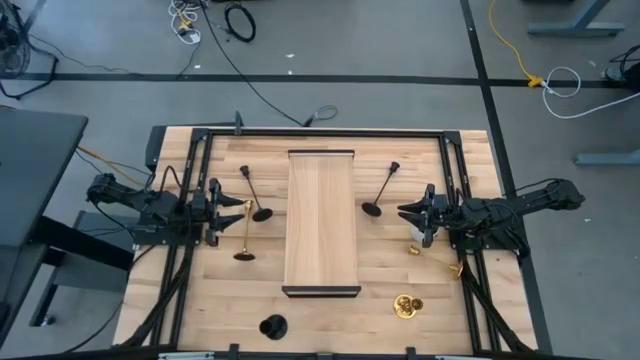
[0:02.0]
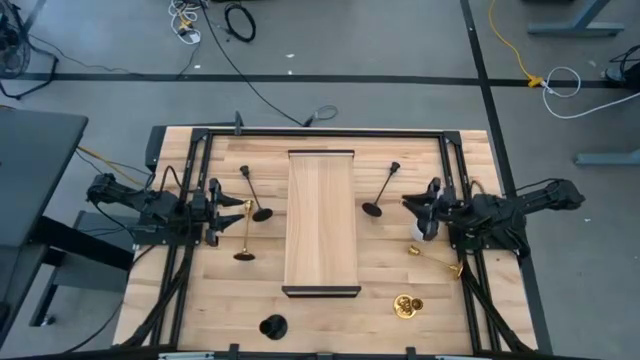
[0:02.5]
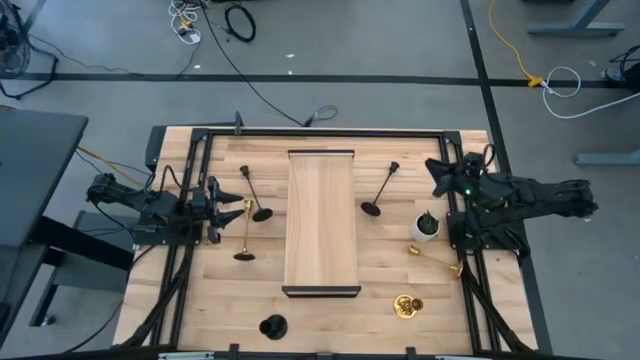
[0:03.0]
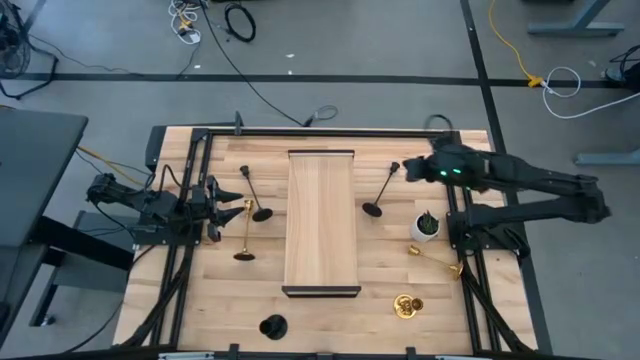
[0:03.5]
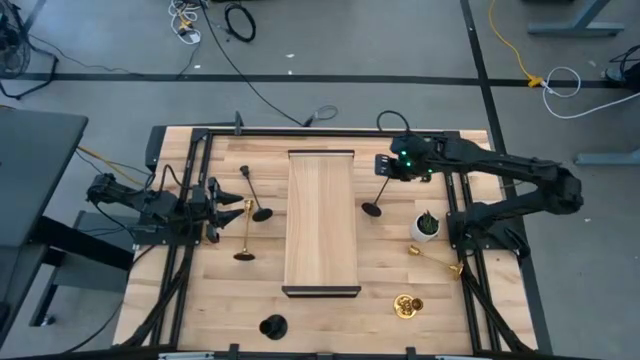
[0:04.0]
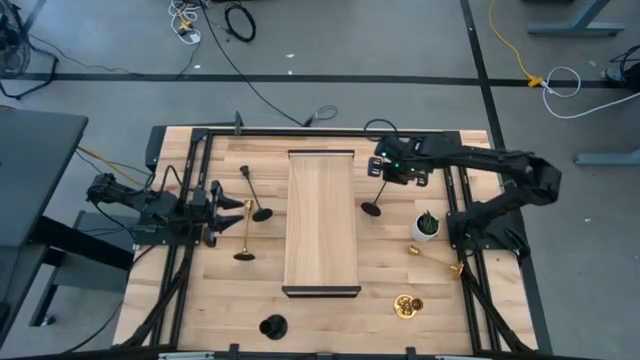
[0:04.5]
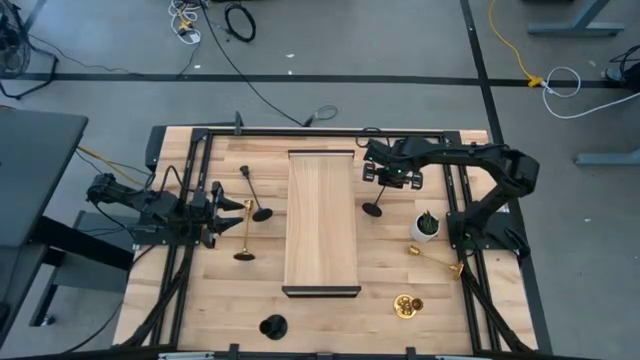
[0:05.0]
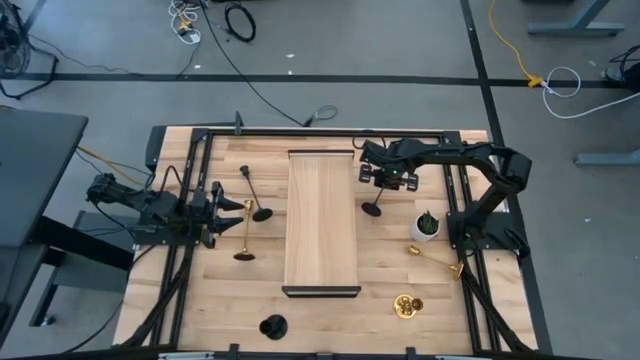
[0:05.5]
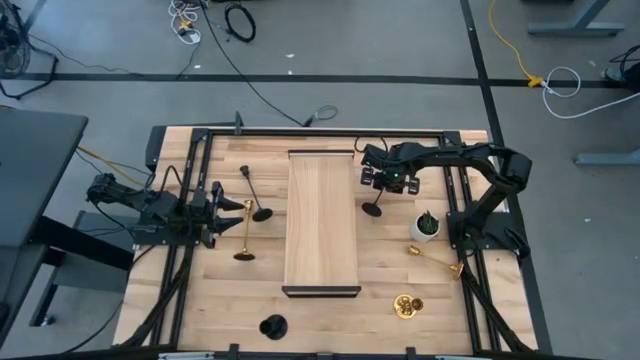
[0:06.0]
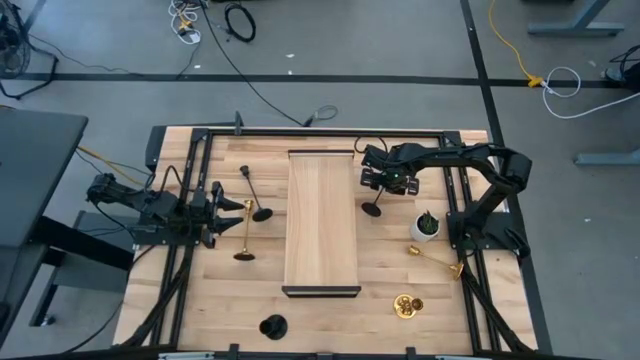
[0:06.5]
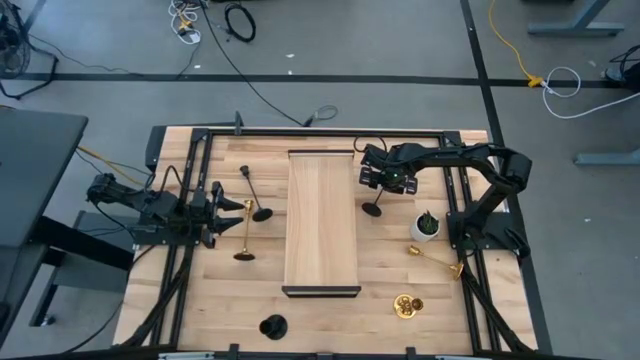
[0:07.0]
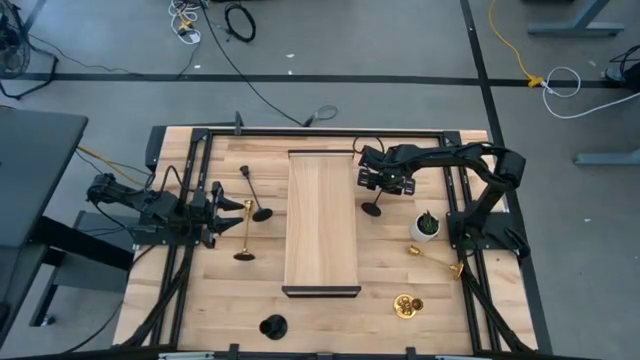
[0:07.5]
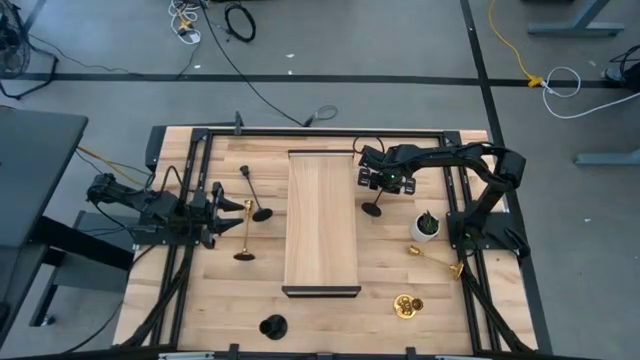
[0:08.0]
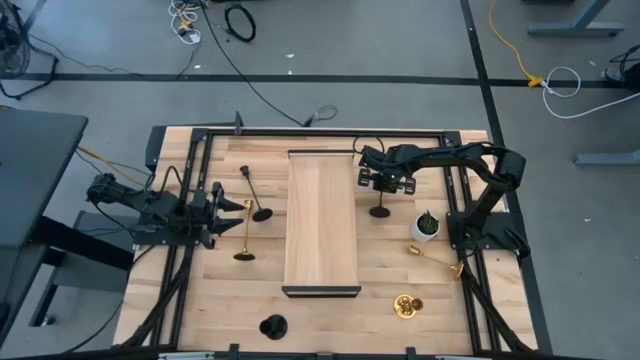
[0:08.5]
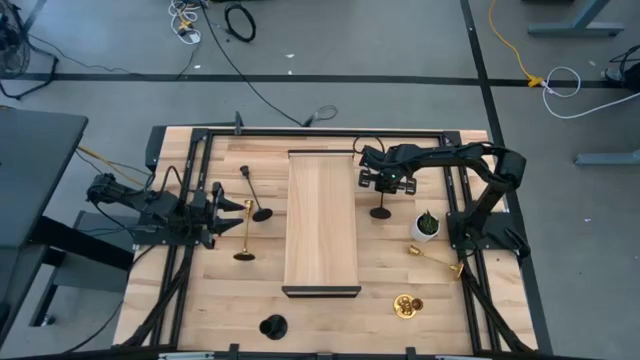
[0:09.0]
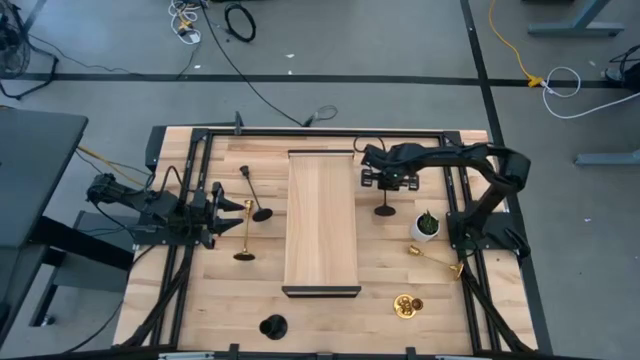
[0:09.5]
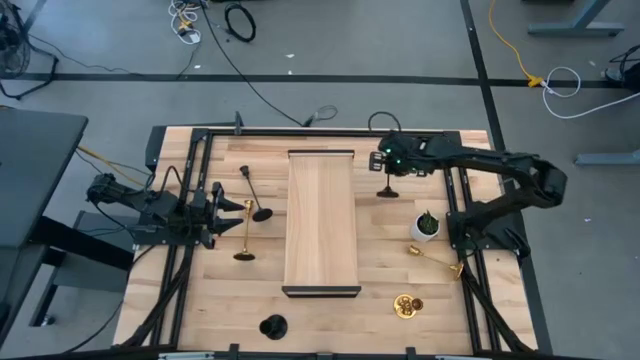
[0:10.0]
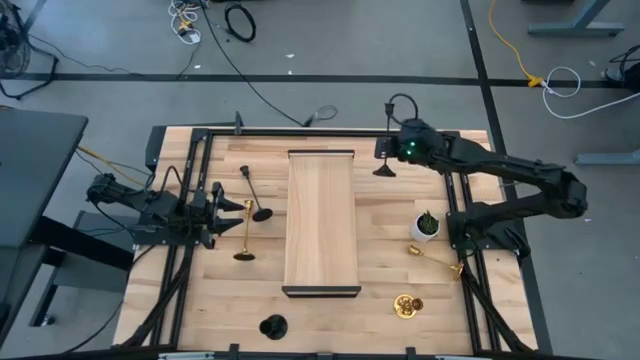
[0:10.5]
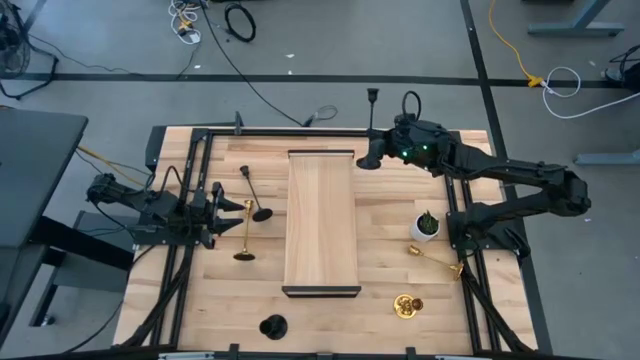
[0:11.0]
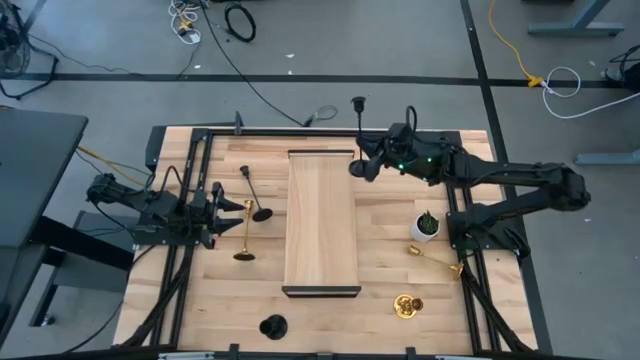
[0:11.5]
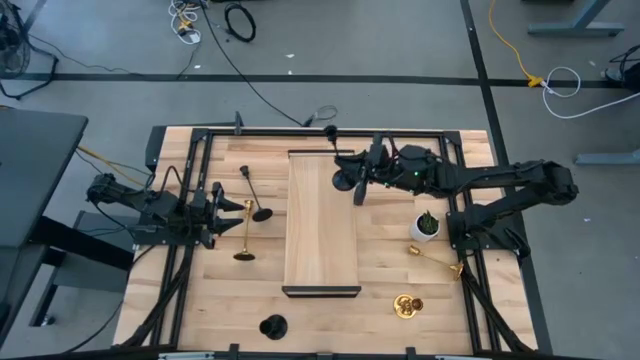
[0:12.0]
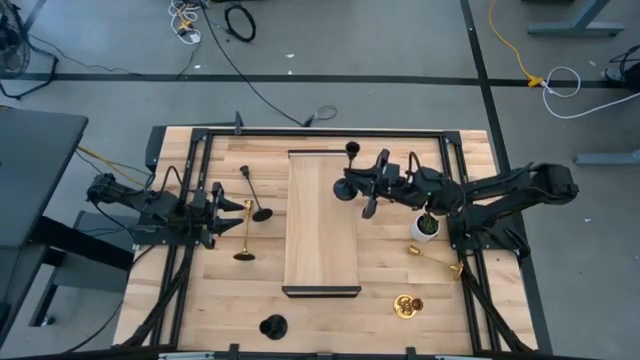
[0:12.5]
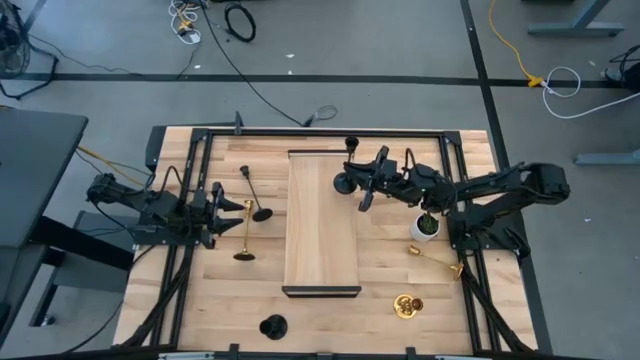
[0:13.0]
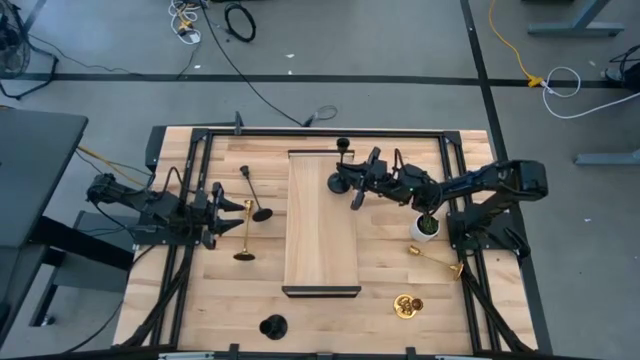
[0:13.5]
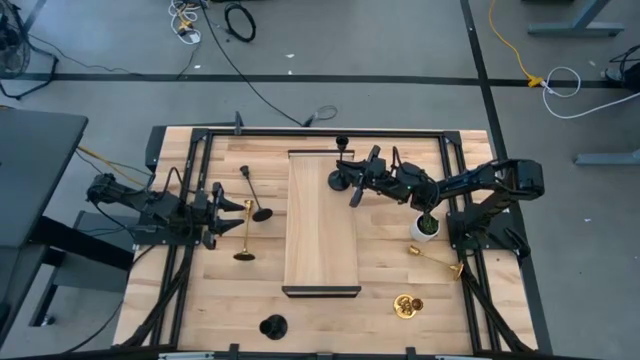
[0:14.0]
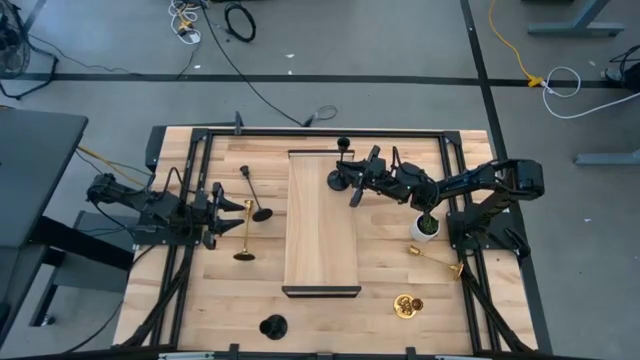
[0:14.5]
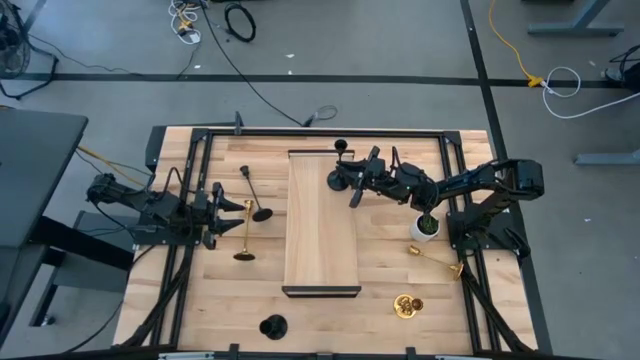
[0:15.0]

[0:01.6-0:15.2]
Task: Pick & Place candle stick holders
Put the top right black candle holder on the shelf

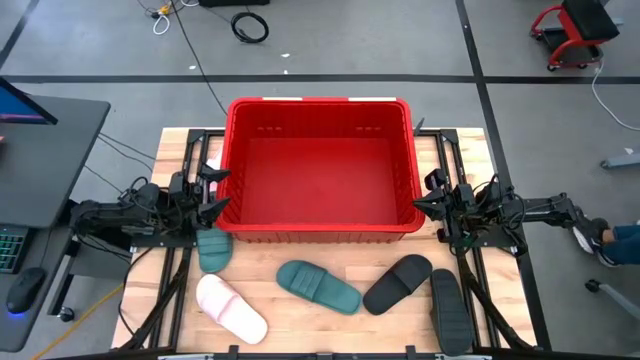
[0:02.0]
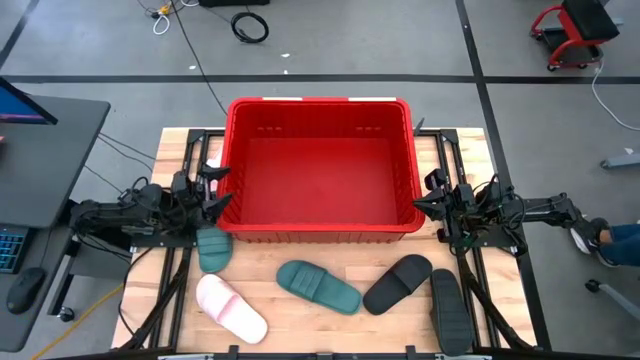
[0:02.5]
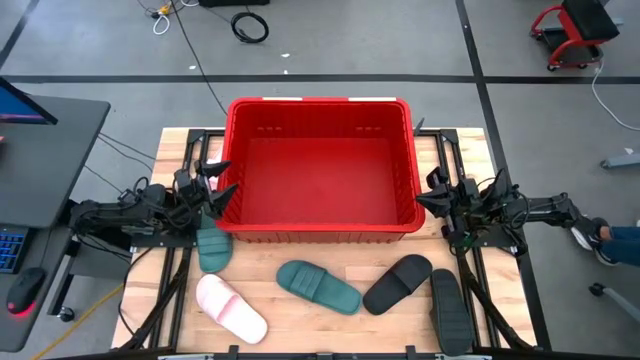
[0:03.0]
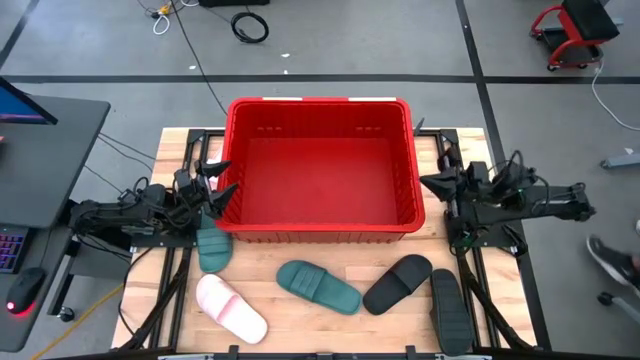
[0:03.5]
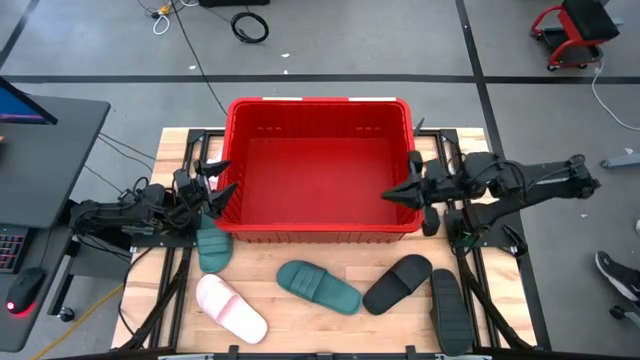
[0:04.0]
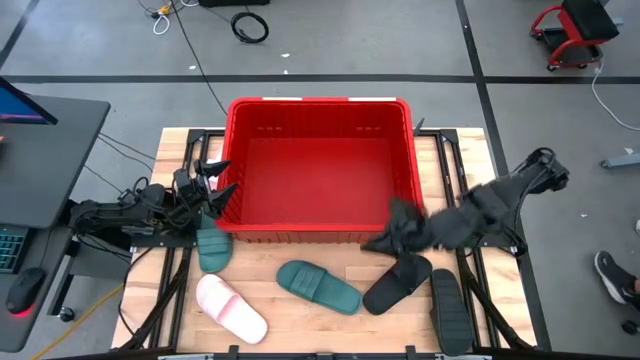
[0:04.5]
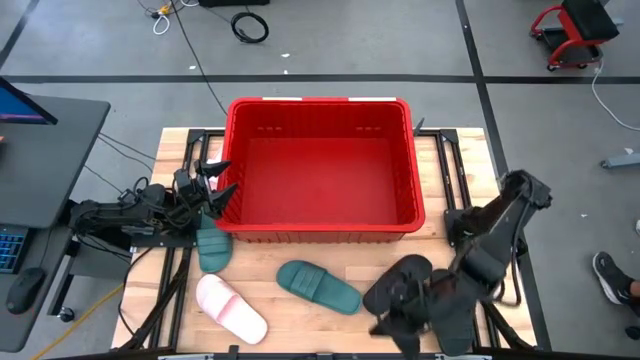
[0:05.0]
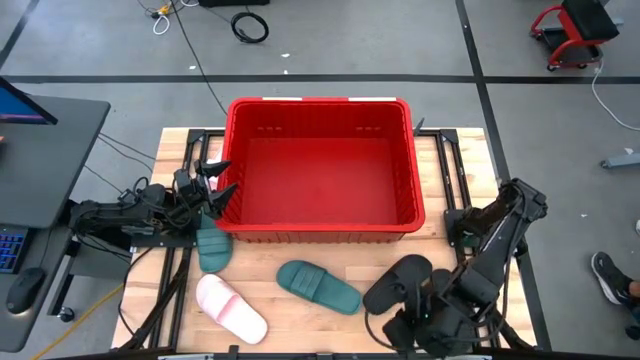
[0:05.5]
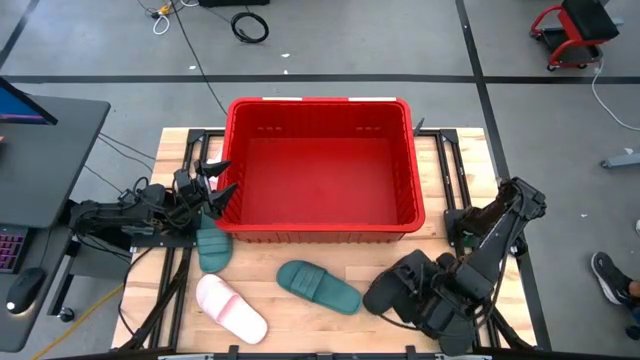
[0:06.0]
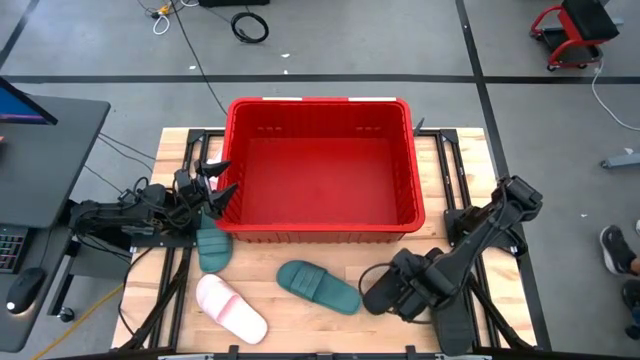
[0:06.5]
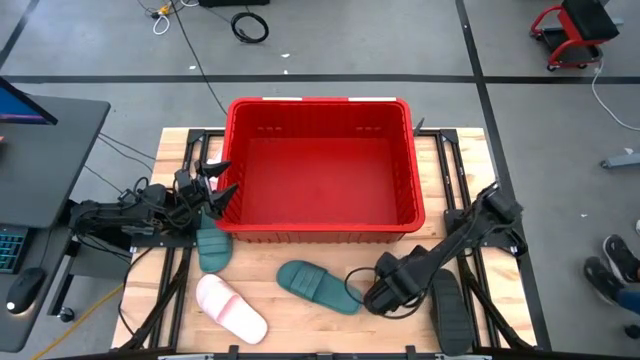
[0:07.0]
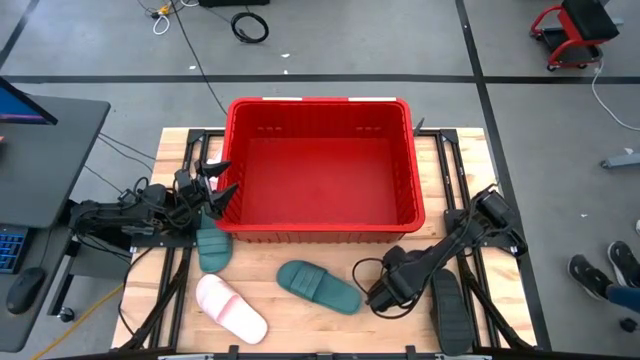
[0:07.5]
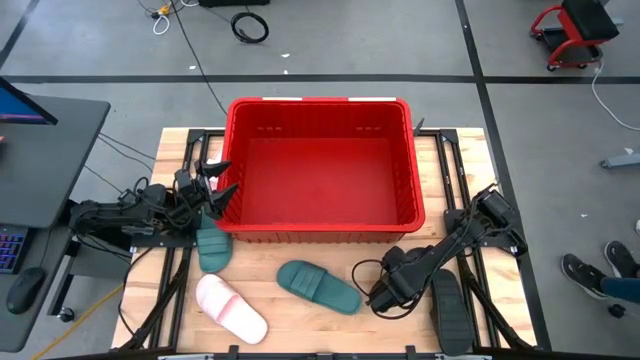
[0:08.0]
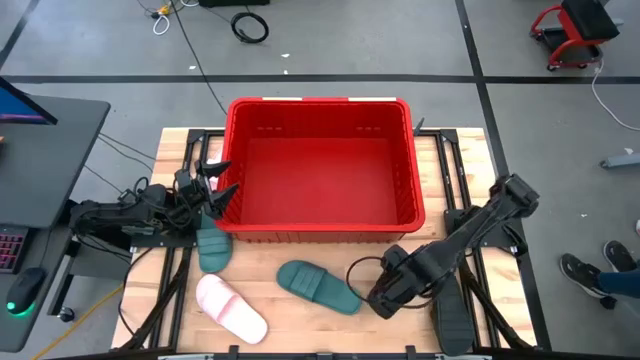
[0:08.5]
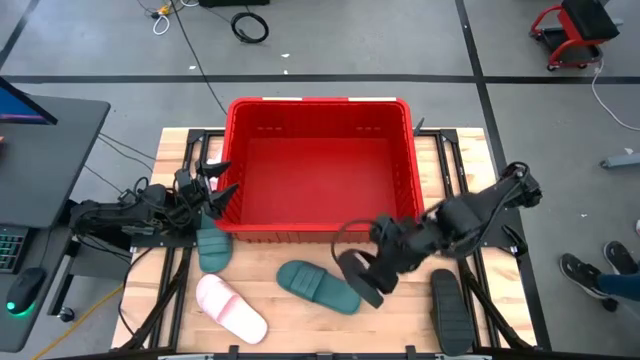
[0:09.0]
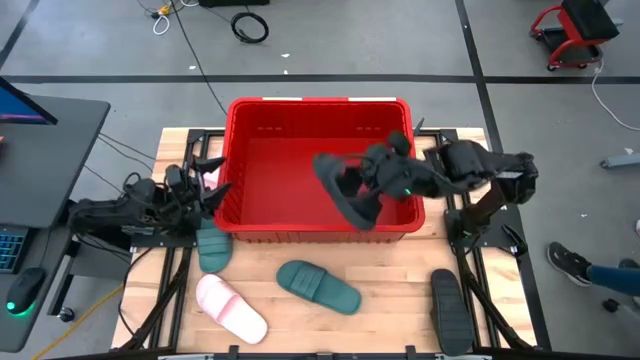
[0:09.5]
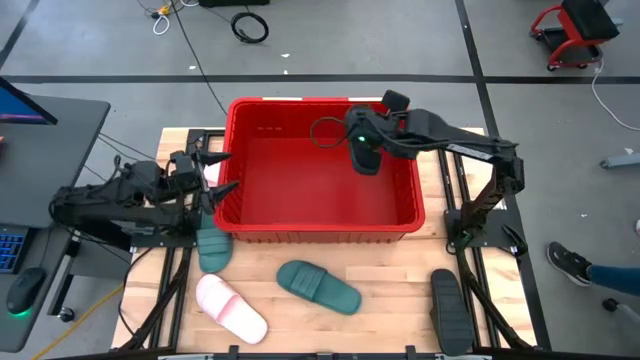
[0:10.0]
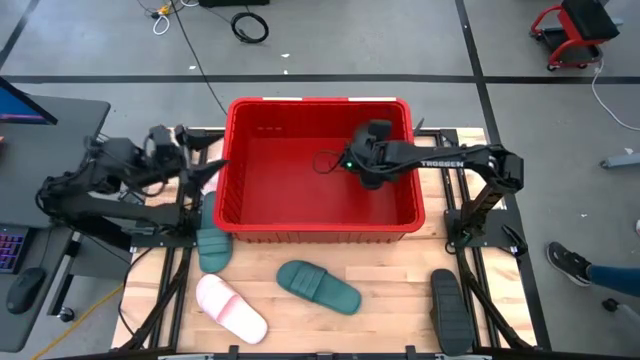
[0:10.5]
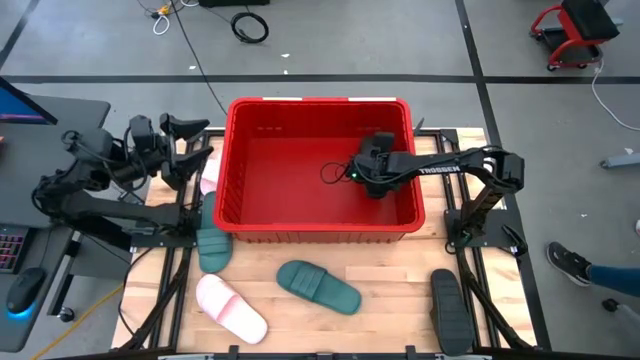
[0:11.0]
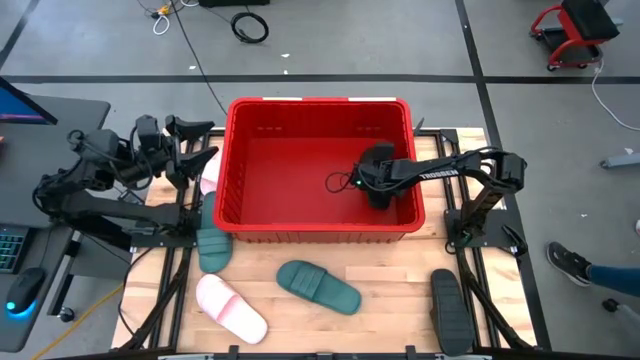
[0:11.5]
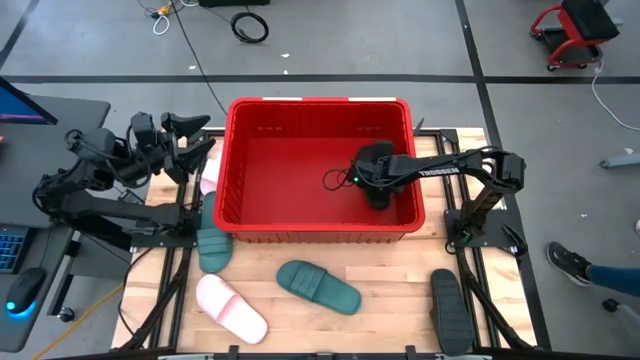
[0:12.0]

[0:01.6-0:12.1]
Task: Pick and place slides into bin
Put the left black slide into the red bin
